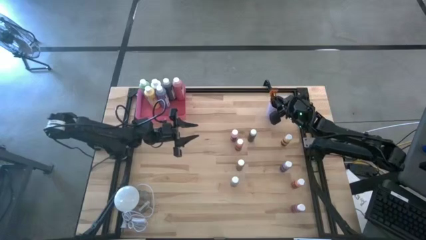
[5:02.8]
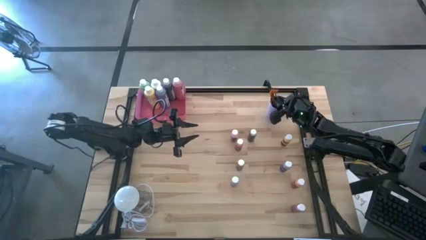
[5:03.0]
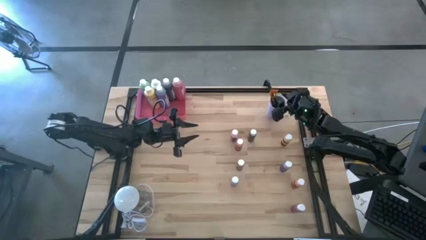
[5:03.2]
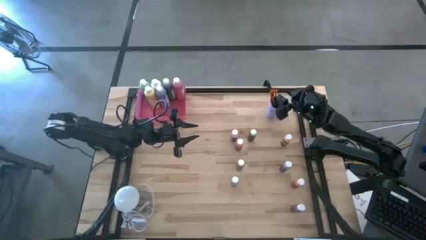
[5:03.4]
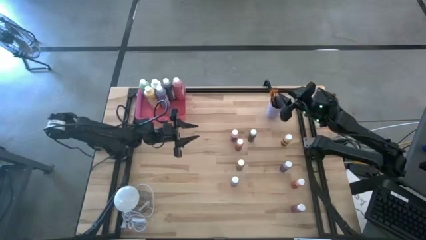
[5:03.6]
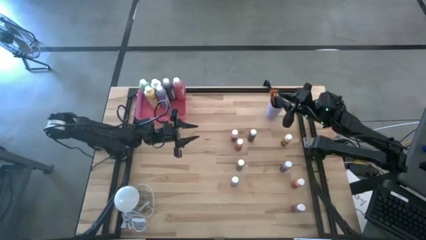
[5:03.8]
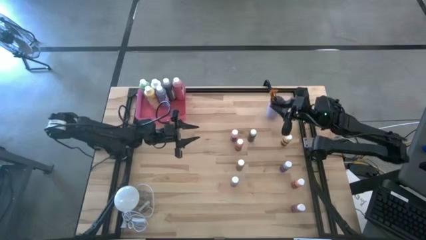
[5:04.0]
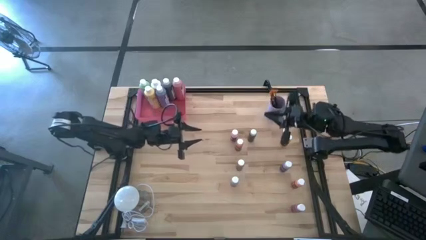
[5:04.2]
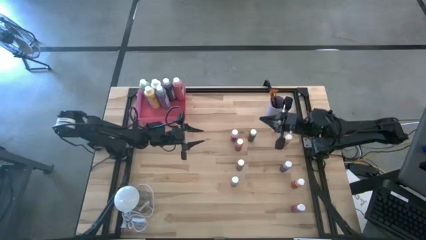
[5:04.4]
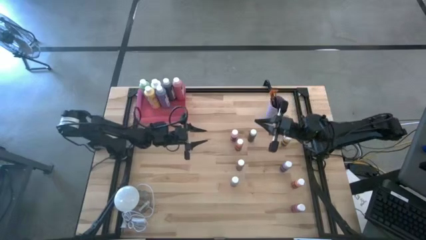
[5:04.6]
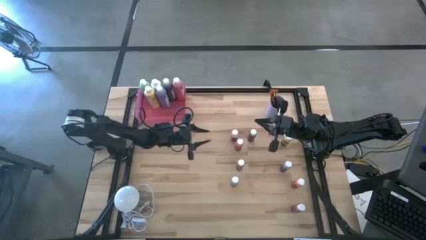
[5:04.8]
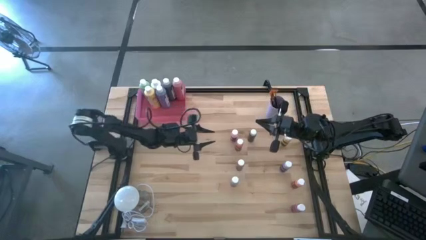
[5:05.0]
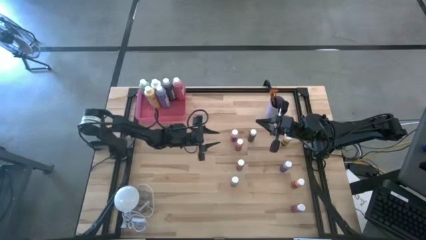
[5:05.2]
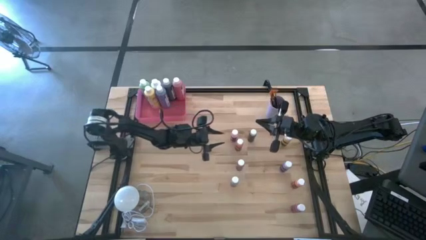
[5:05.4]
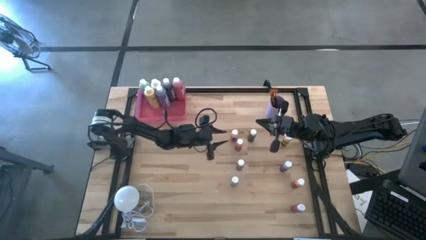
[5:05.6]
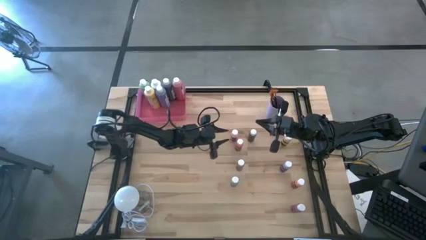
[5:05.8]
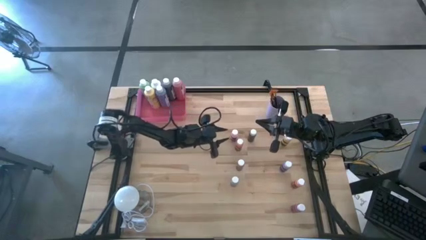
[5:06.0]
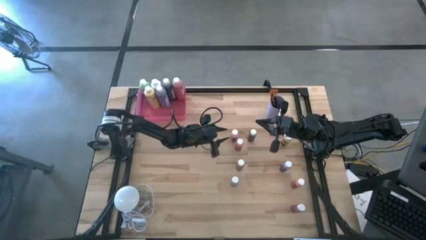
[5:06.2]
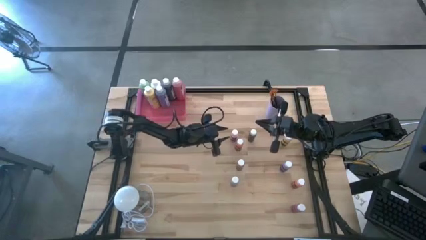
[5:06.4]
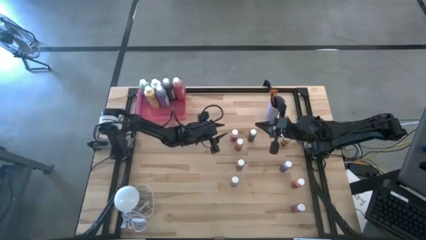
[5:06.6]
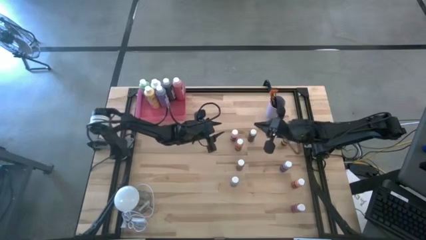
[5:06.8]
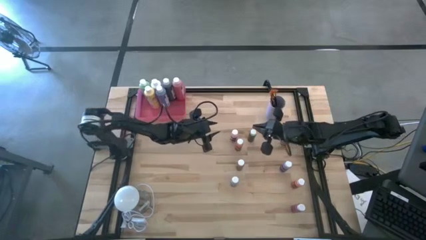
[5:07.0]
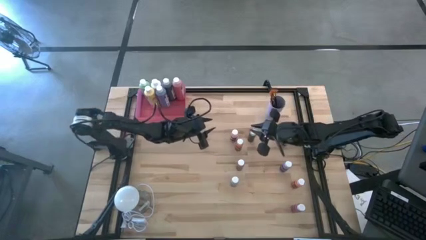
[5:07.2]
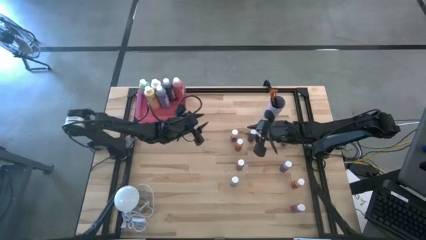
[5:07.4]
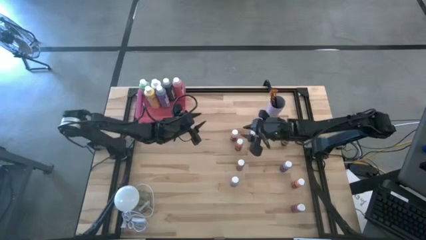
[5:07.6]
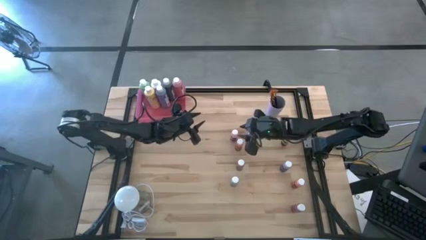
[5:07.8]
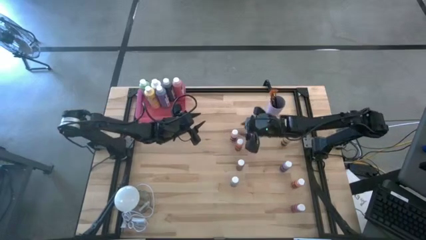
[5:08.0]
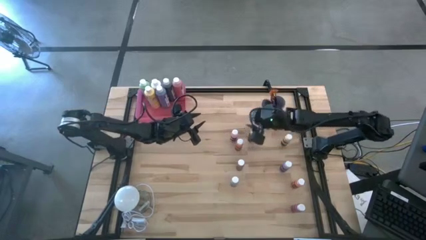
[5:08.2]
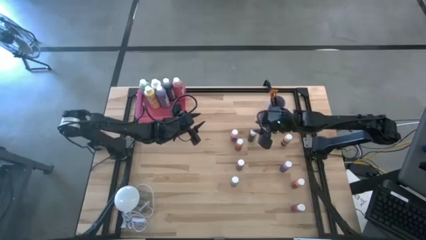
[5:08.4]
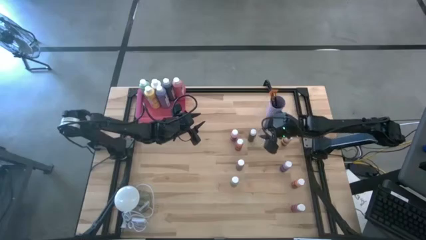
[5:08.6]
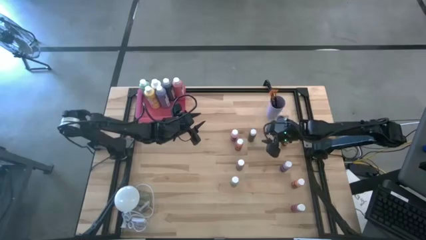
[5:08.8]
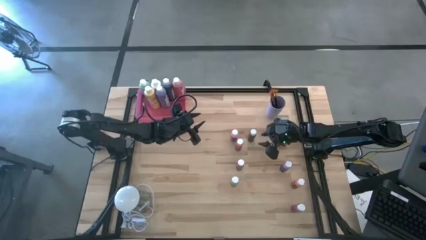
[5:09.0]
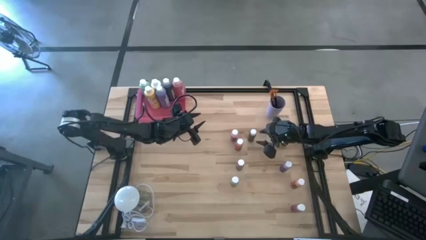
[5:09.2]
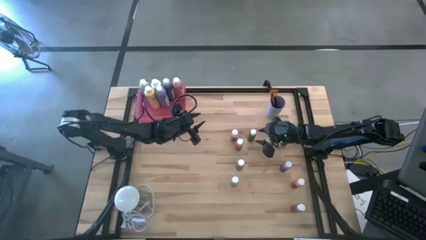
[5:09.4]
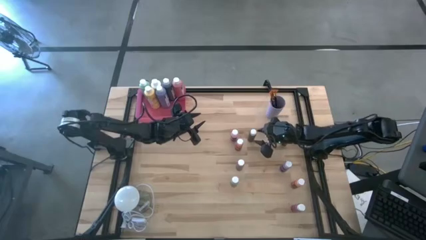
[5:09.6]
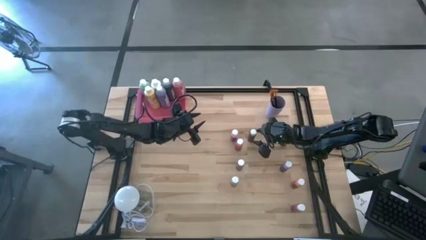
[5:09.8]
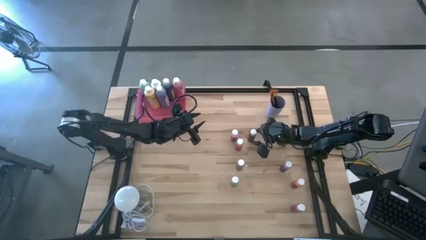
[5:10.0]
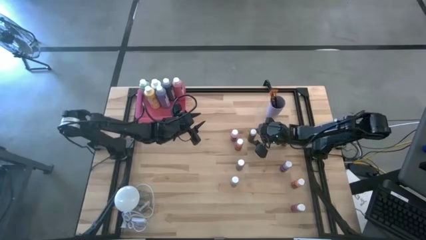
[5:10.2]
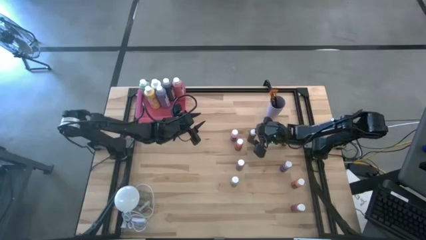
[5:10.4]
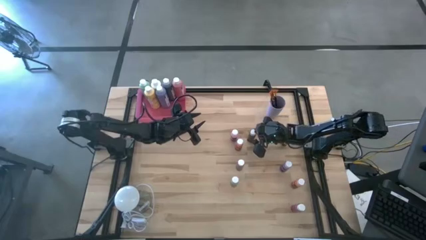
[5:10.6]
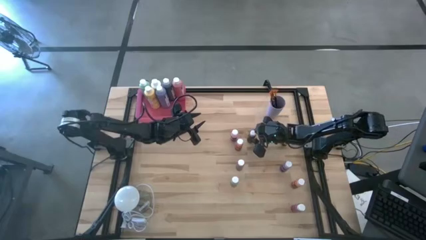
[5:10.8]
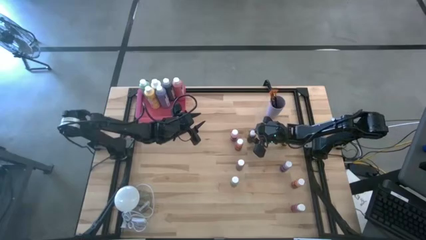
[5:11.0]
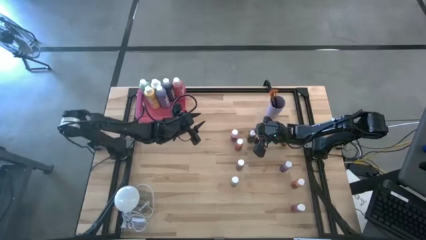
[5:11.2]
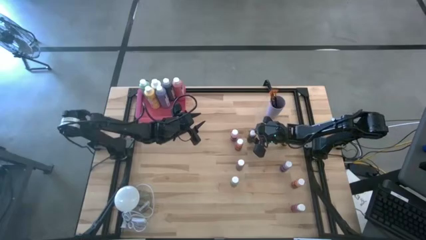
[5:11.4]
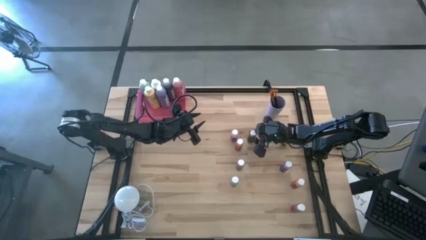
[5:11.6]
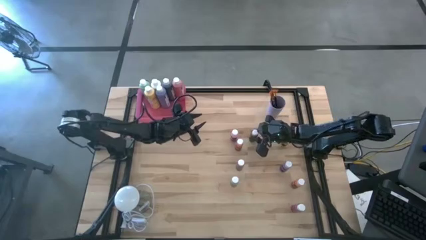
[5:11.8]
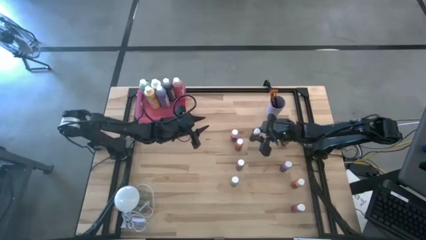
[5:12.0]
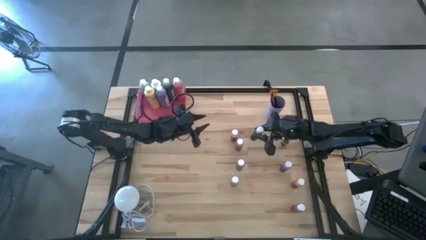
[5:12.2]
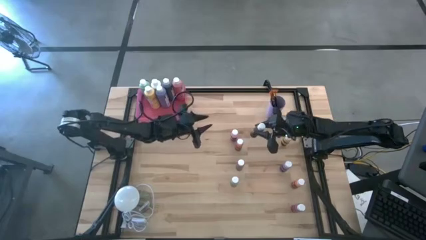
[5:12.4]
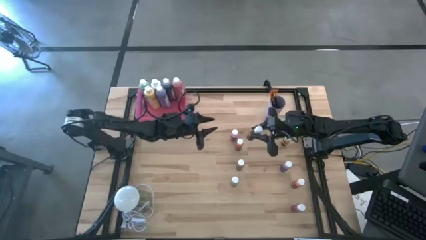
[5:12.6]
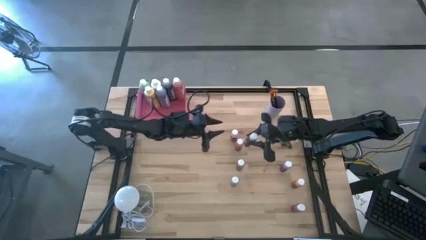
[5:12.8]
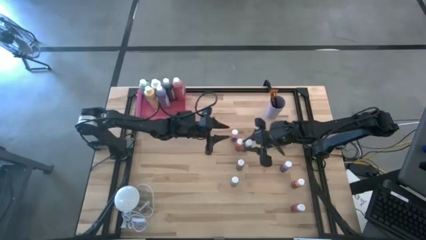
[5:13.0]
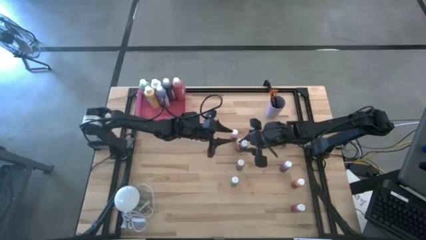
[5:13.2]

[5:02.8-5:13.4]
Task: Pick & Place Paint Supplies
Put the small brown paint bottle into the pink bin

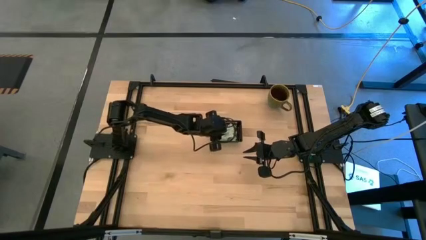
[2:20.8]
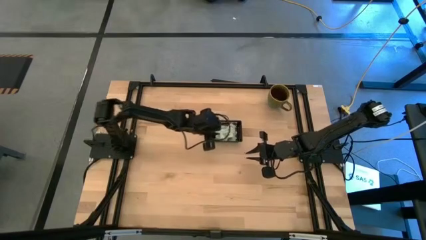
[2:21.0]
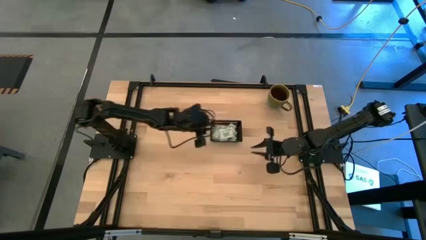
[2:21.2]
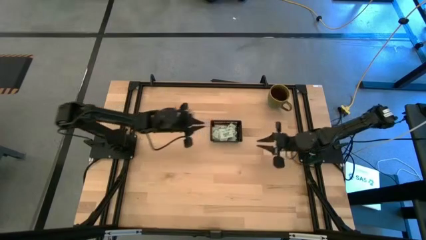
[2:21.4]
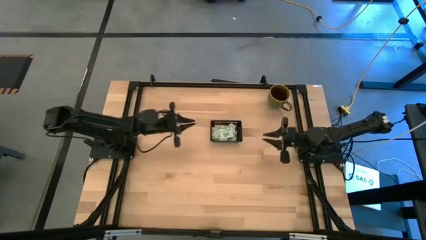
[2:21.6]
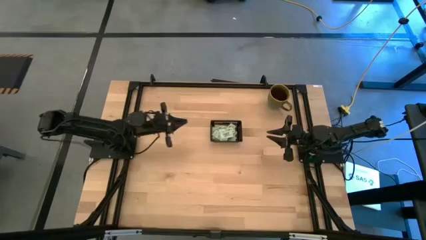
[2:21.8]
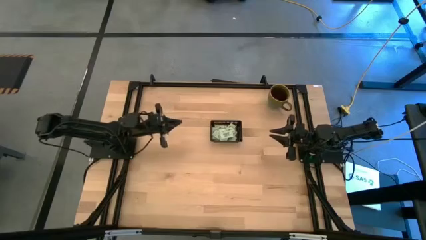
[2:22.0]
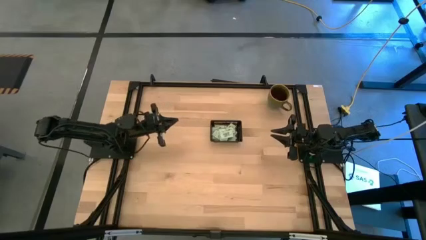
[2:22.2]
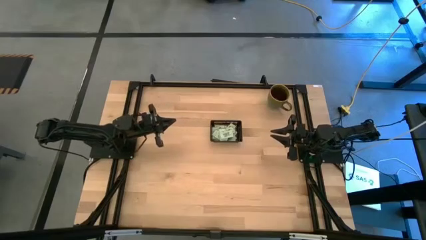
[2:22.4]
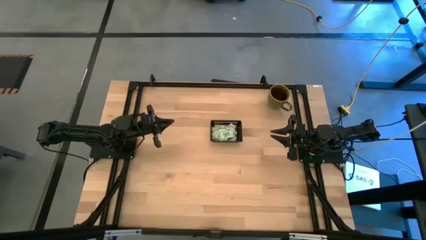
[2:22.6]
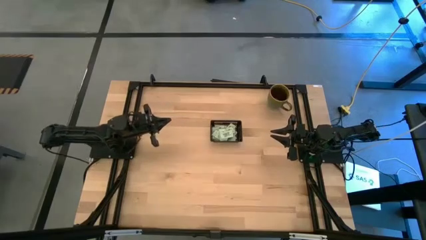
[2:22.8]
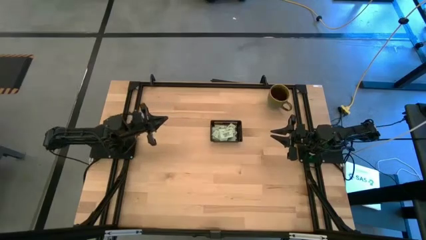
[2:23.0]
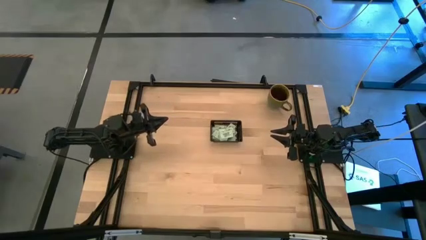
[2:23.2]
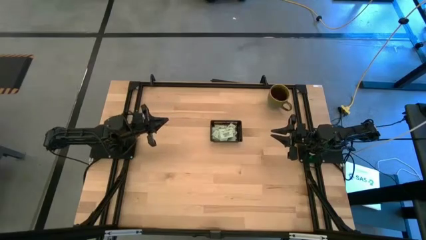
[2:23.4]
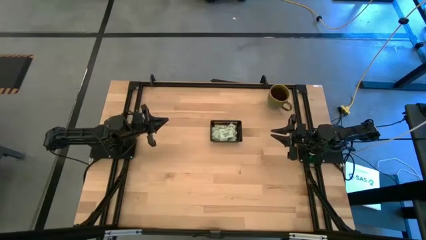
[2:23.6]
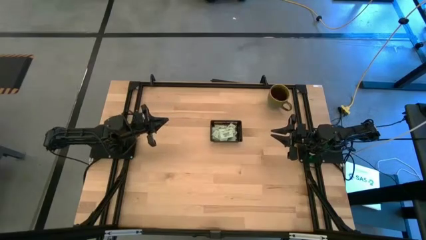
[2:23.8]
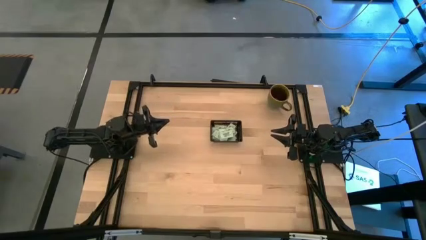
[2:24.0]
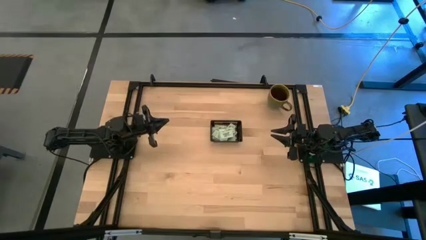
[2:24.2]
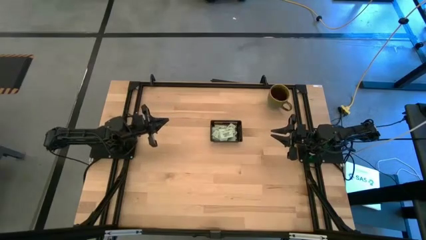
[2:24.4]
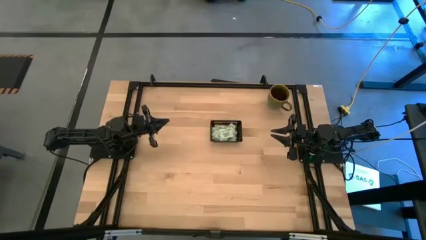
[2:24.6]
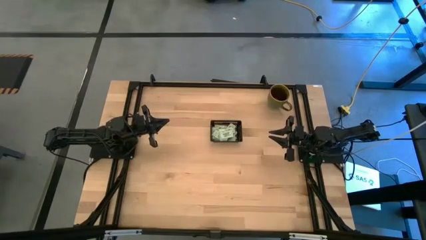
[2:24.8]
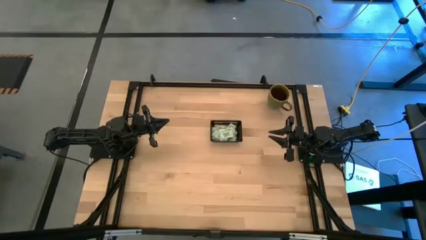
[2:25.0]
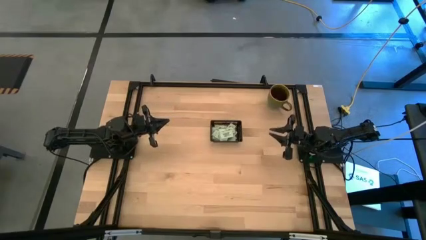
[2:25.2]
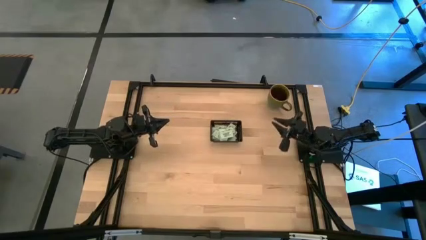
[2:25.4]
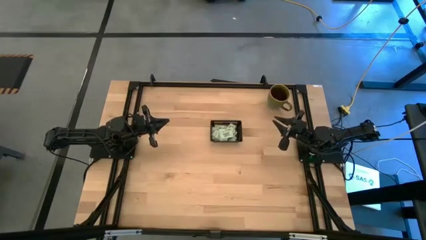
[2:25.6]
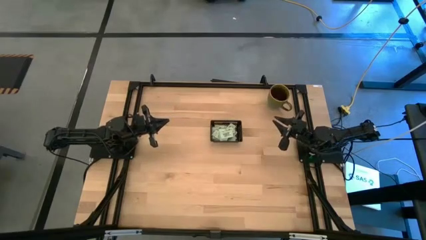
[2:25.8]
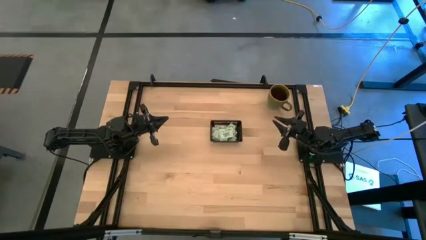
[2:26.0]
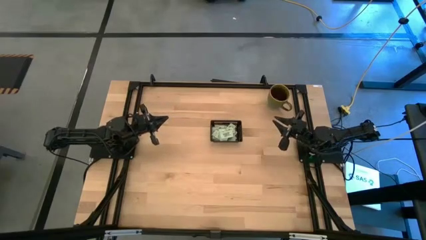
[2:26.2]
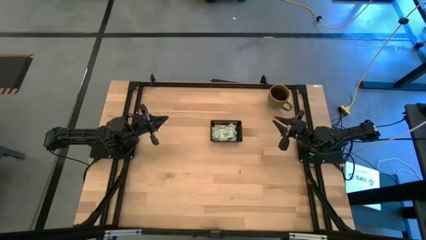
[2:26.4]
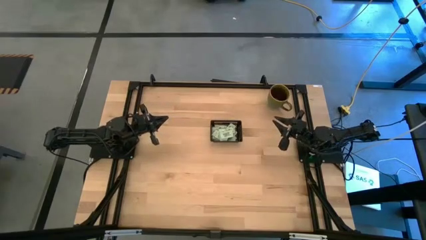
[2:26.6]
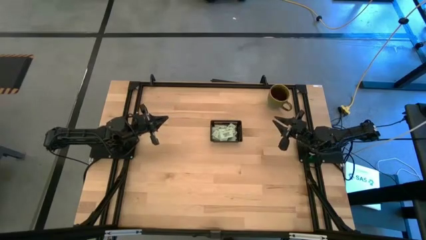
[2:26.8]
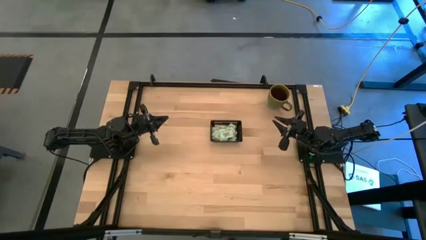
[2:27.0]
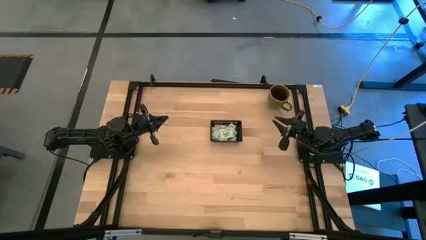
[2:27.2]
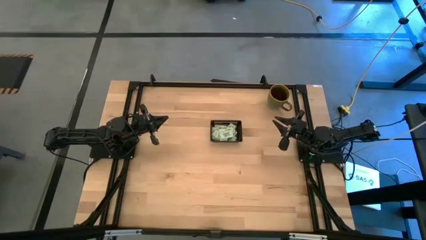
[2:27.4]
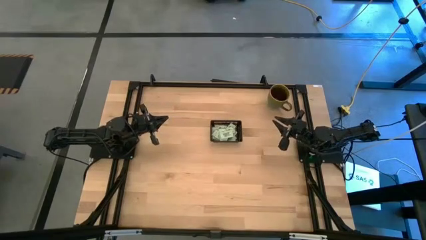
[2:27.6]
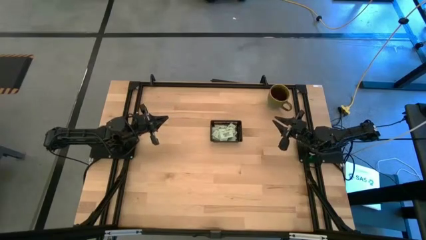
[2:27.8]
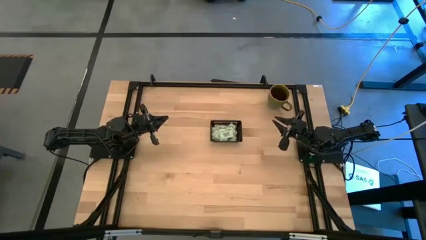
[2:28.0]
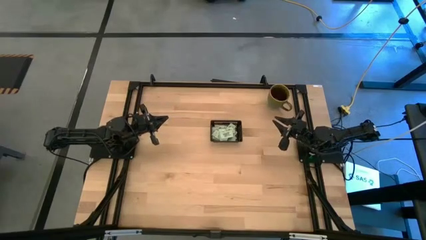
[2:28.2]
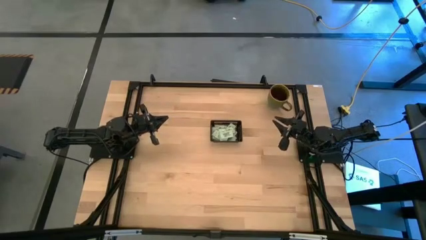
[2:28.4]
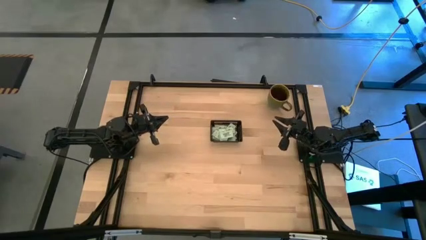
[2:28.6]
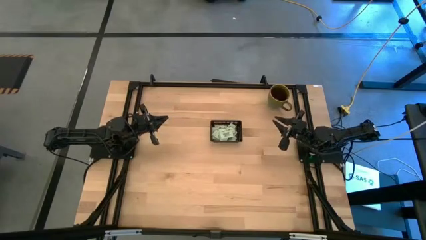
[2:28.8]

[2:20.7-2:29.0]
Task: Pick and place Stevia / Truvia into bins
Return to Home Position
